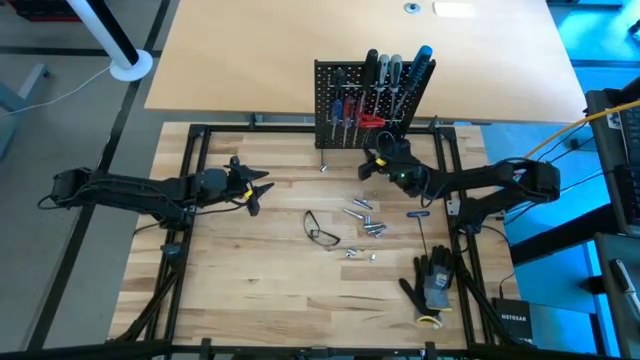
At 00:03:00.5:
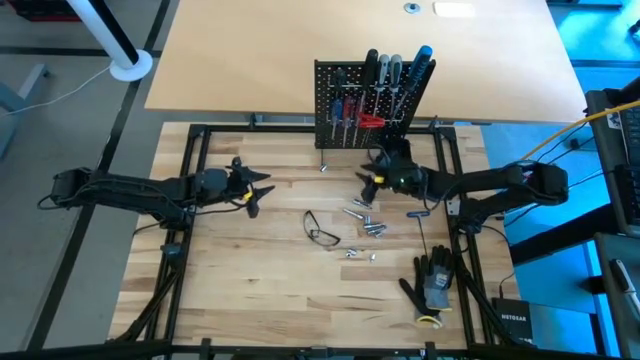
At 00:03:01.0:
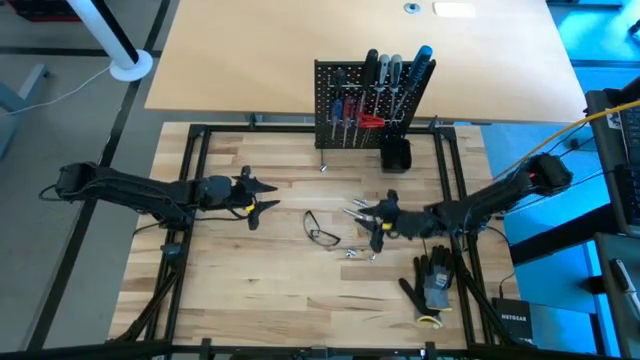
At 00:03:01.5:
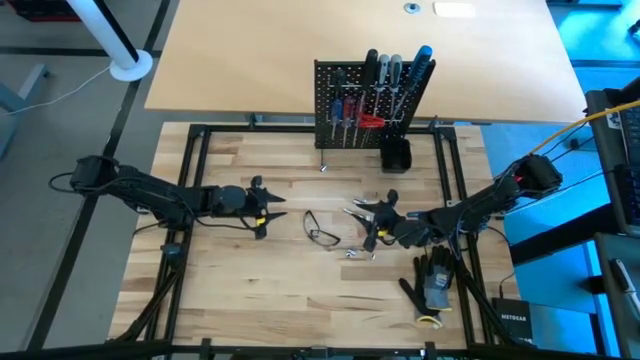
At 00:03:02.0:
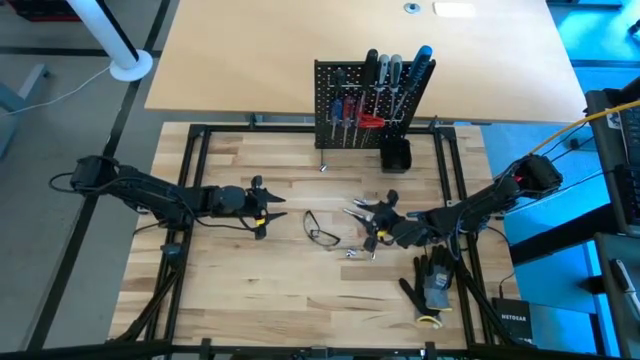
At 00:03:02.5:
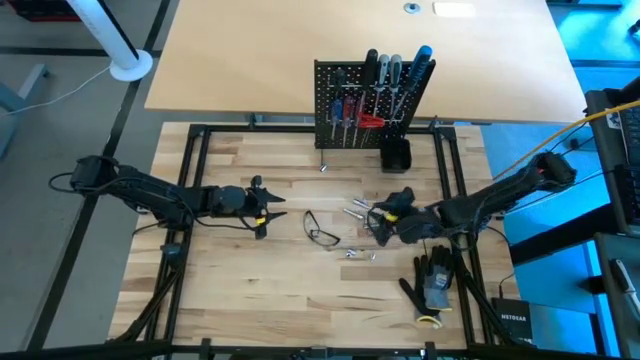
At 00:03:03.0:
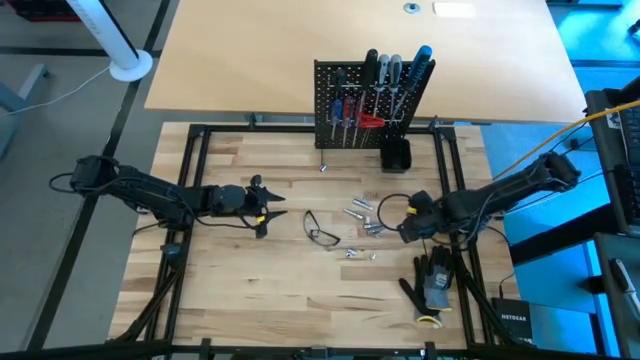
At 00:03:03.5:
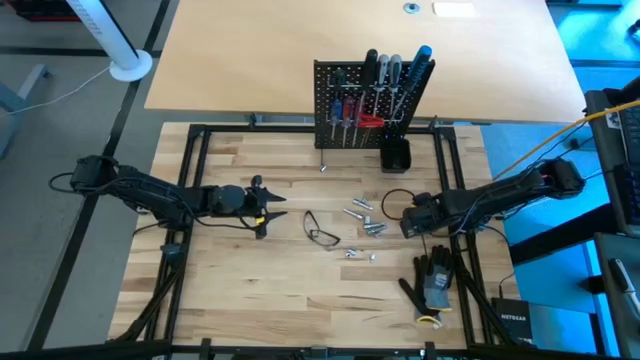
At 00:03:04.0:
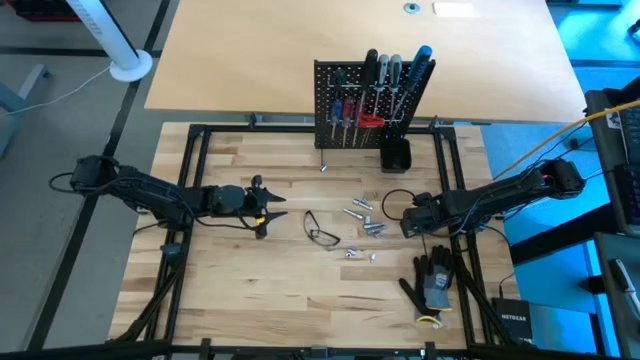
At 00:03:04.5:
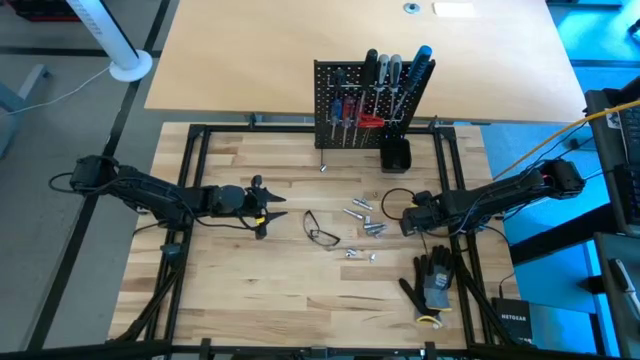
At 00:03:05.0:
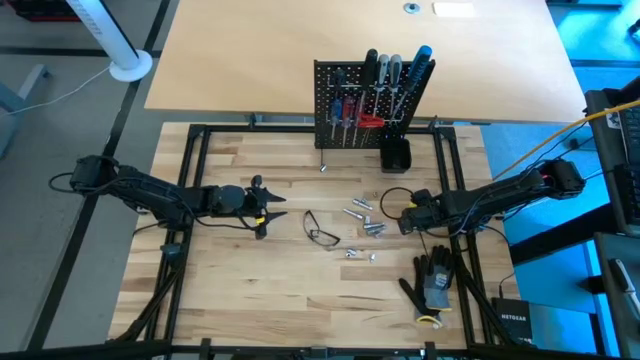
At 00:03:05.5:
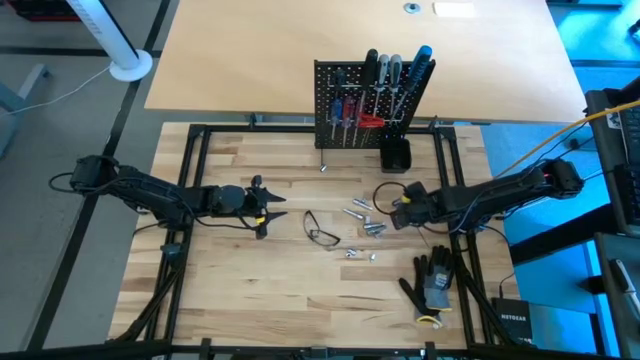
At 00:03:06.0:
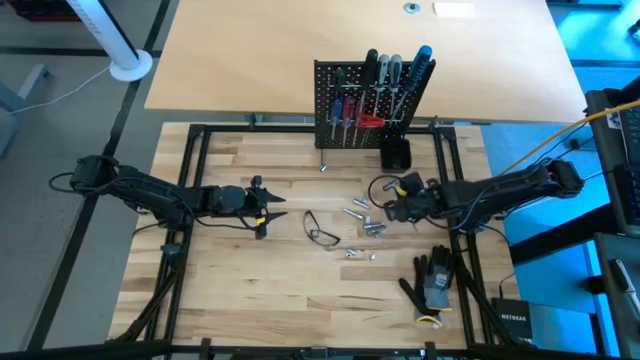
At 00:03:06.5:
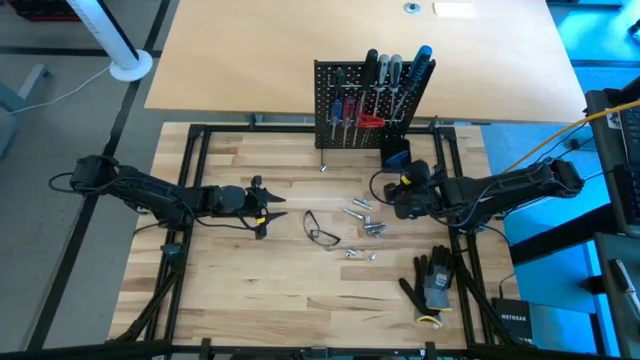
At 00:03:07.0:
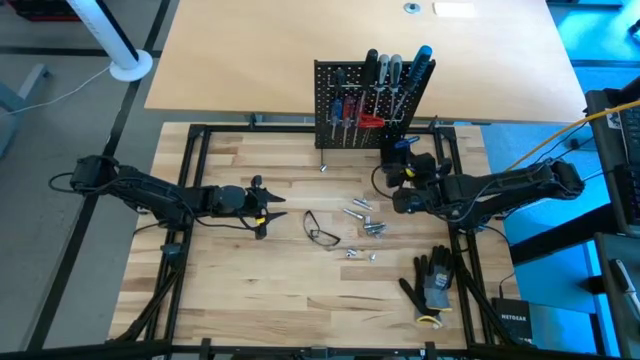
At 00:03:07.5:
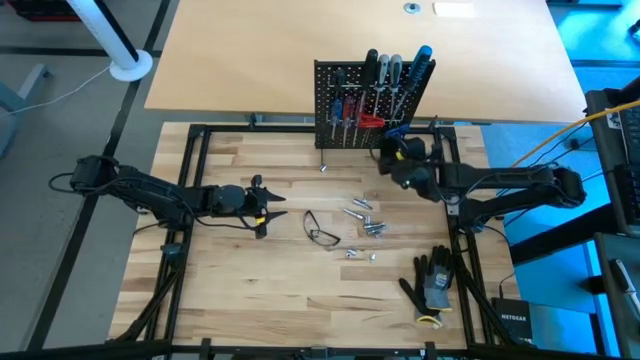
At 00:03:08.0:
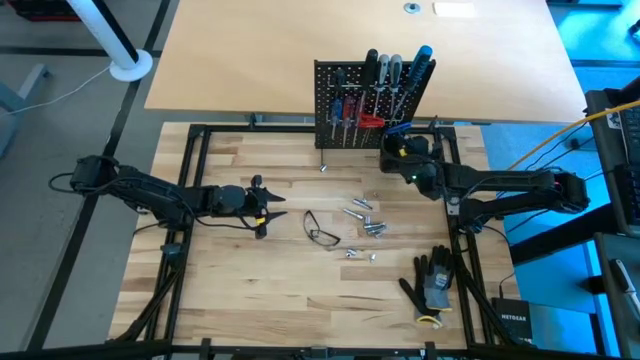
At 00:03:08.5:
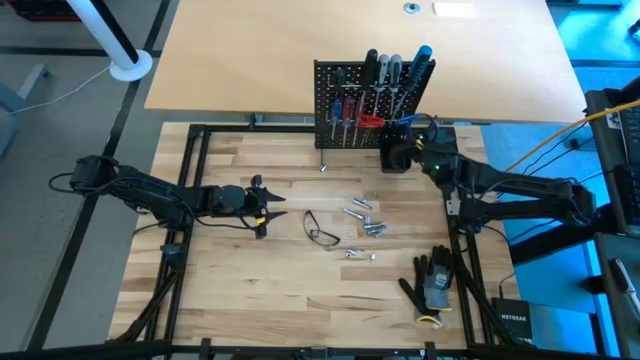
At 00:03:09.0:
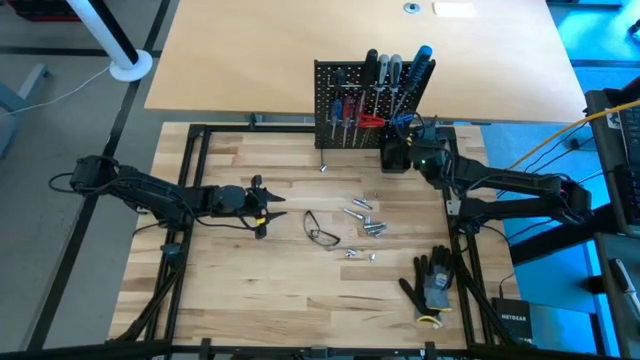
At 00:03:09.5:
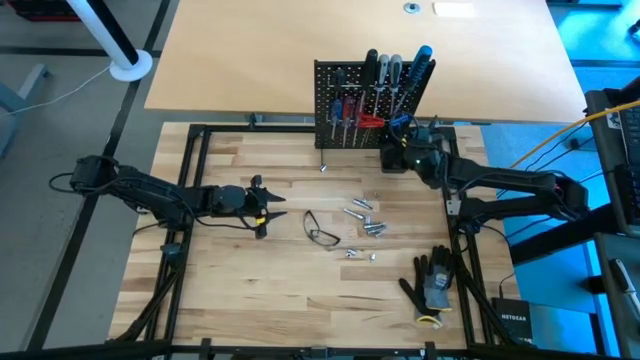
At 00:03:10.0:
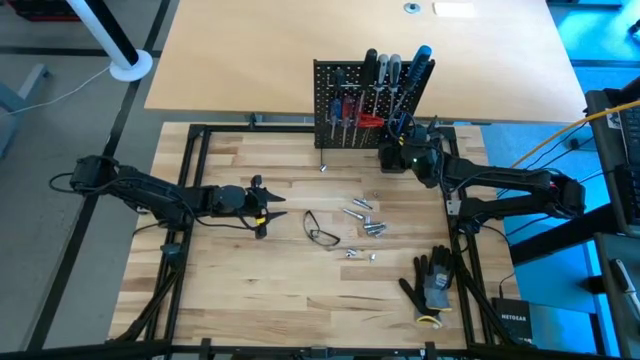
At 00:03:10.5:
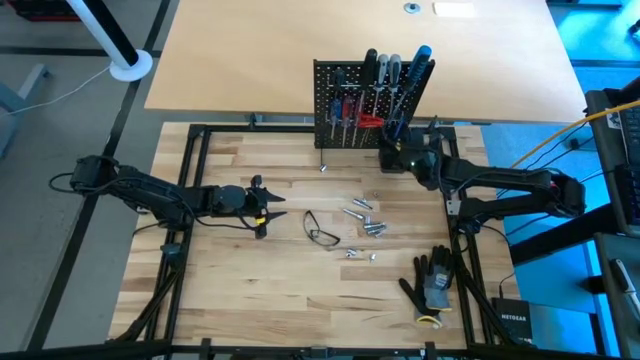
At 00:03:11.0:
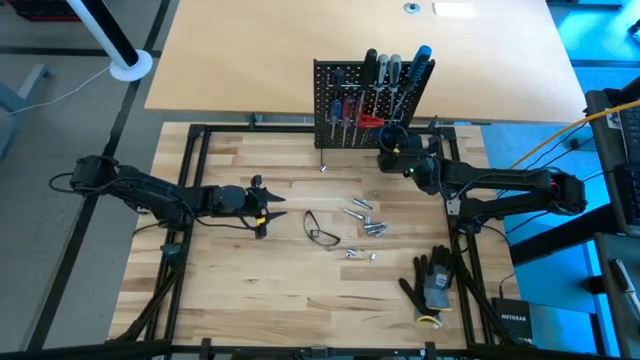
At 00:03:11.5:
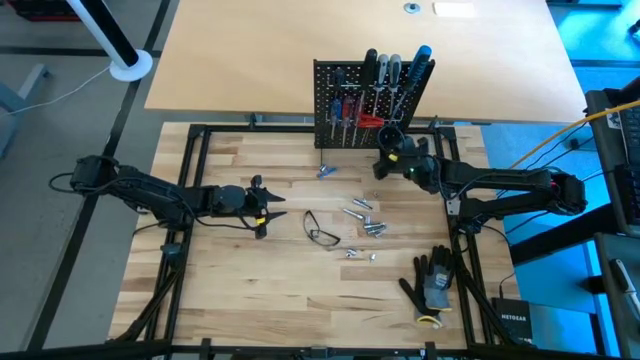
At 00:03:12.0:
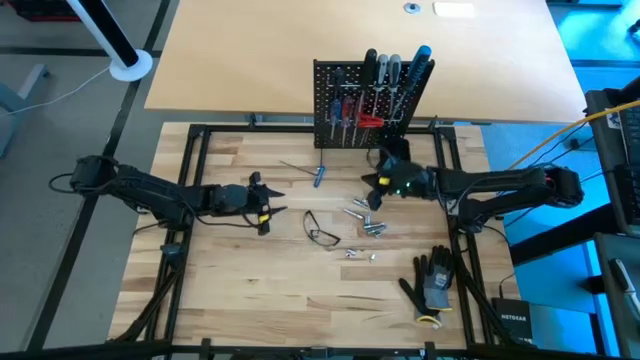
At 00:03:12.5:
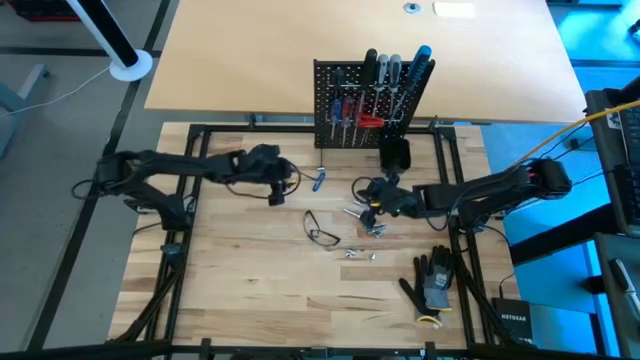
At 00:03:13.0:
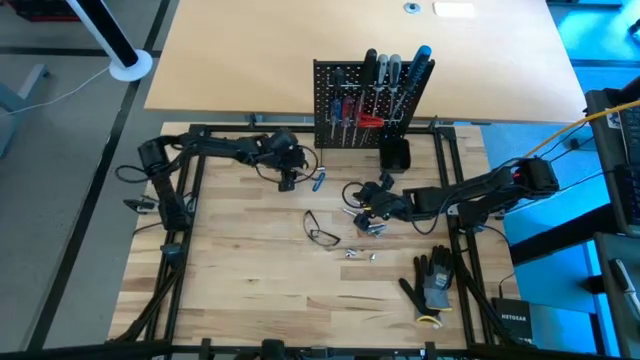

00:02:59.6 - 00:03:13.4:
Task: Hang tools onto peg board
Hang the blue pick tool on the peg board

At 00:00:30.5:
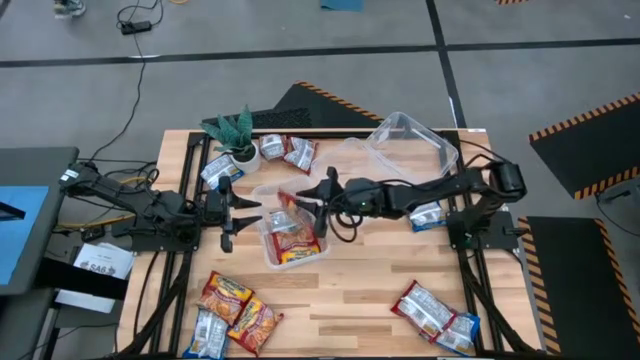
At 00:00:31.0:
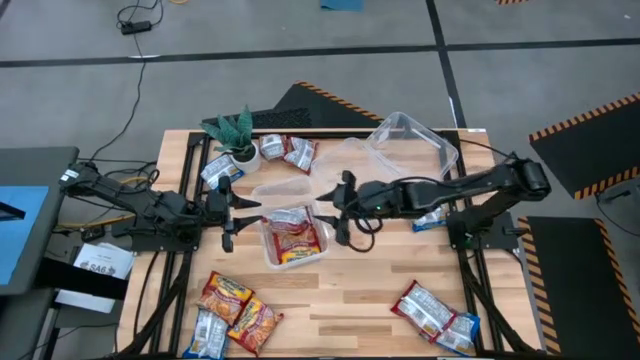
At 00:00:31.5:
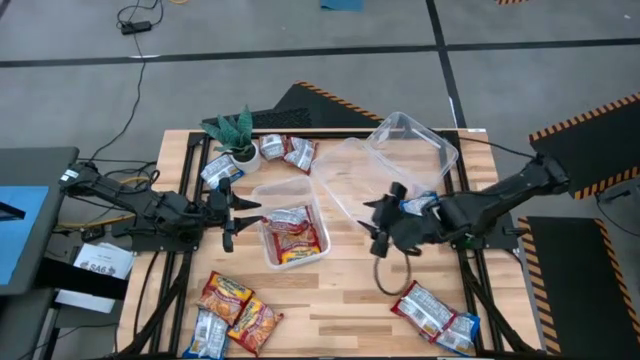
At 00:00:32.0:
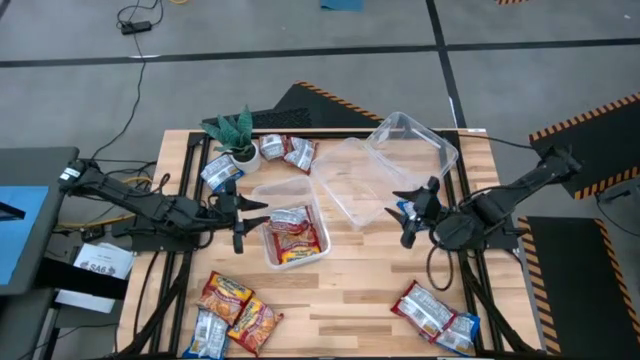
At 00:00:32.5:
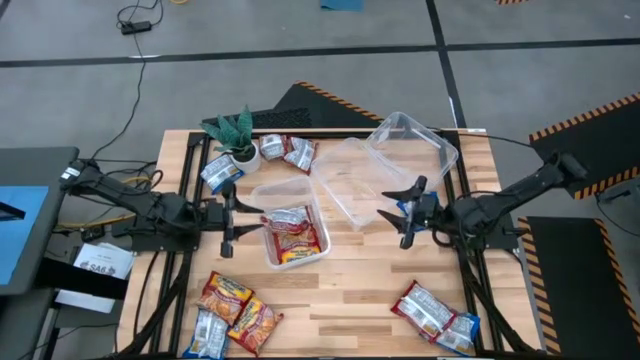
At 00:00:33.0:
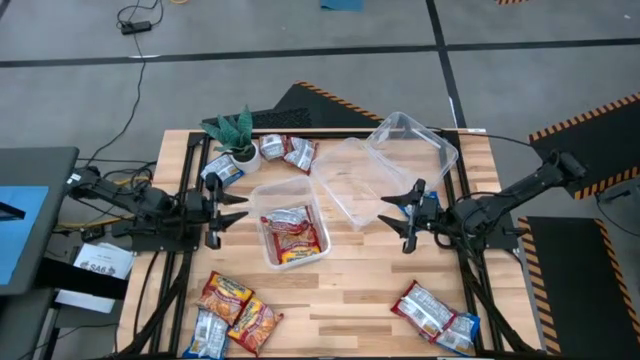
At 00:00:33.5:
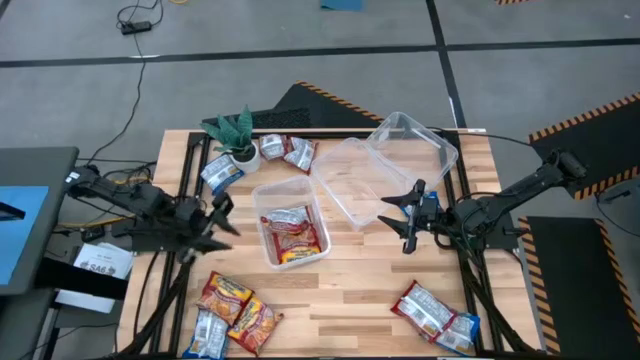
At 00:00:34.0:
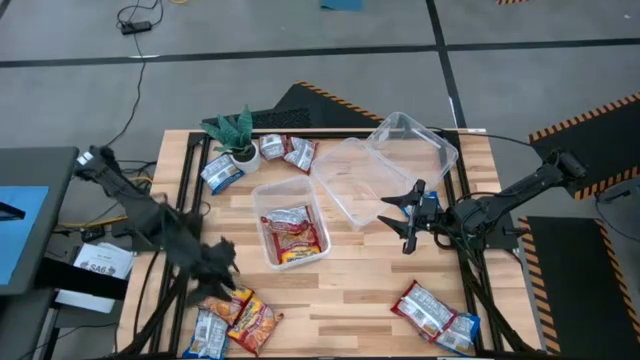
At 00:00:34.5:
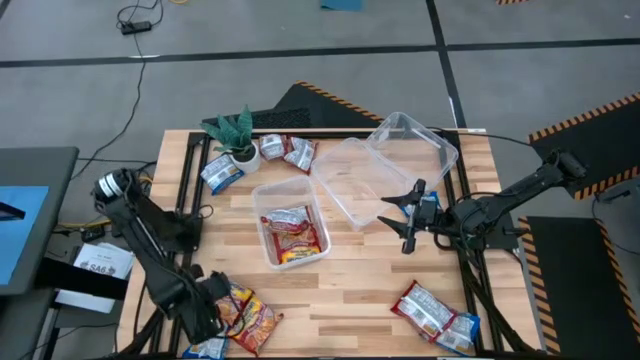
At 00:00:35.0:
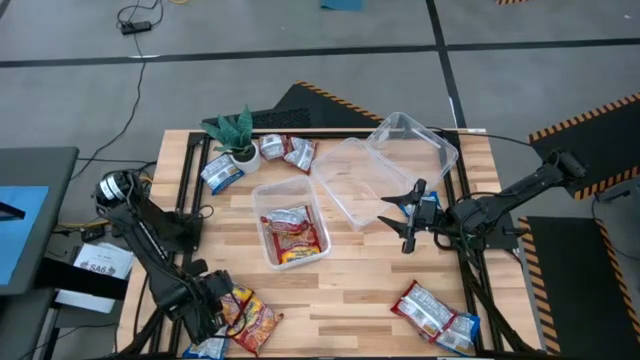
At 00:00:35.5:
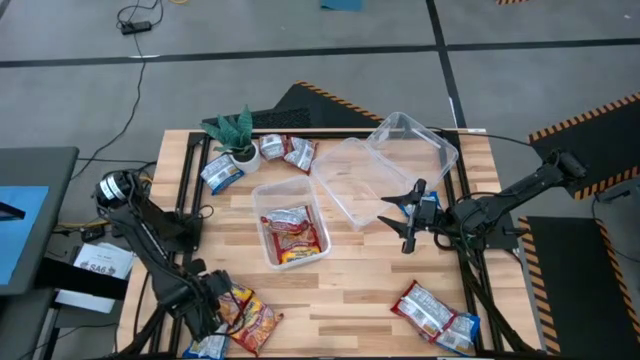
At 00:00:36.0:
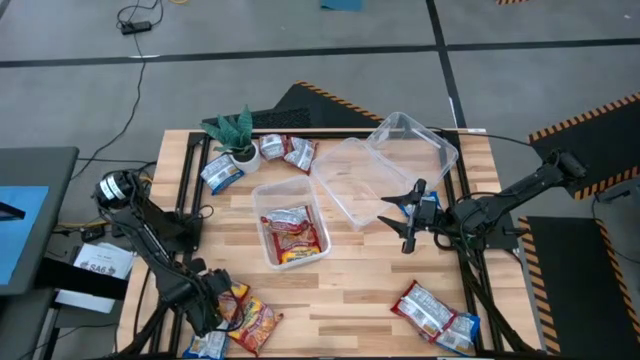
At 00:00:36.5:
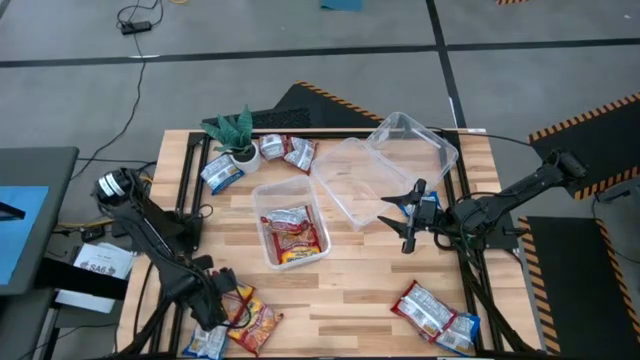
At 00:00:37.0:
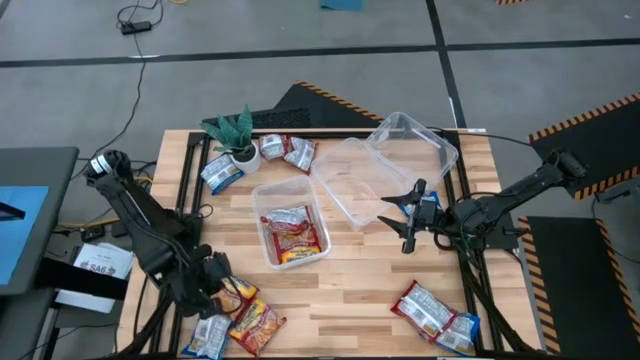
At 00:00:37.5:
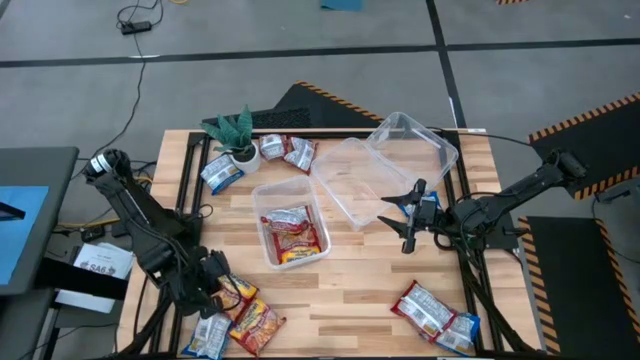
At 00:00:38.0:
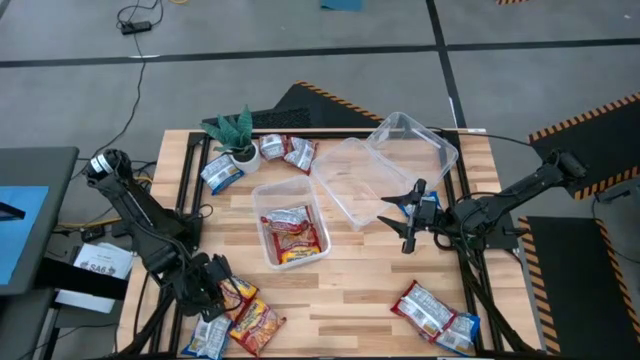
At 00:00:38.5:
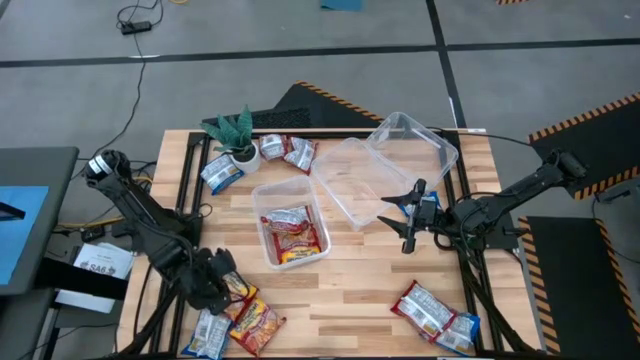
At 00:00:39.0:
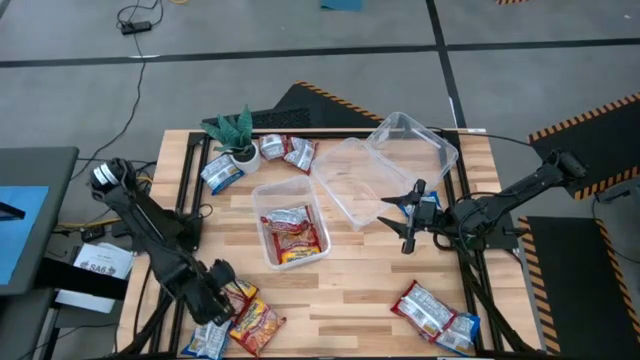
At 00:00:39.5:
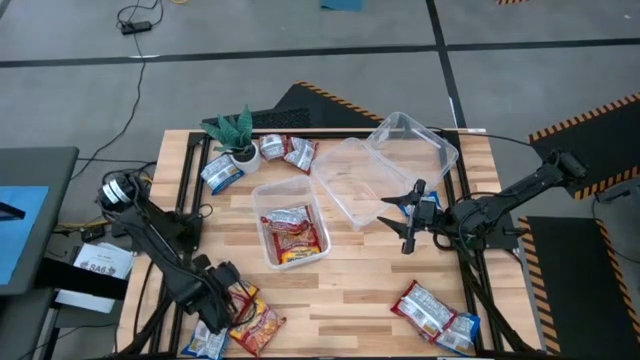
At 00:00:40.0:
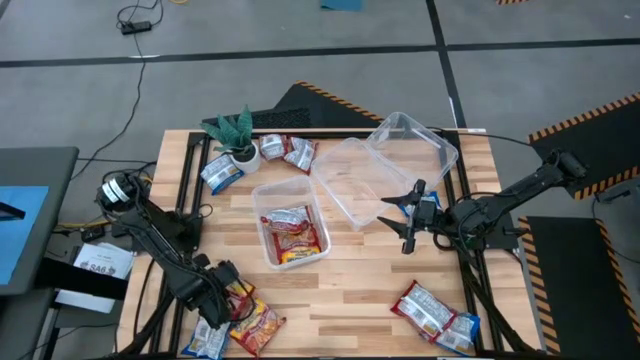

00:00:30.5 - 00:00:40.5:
Task: Sort Maruchan noodles
Put the red noodle pack into the middle bin
